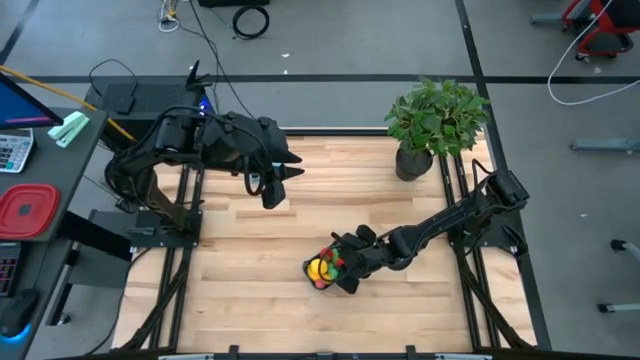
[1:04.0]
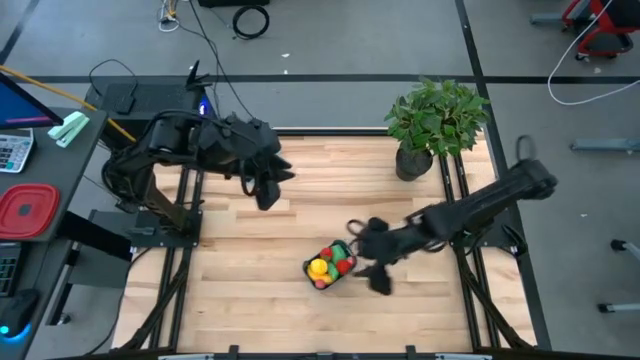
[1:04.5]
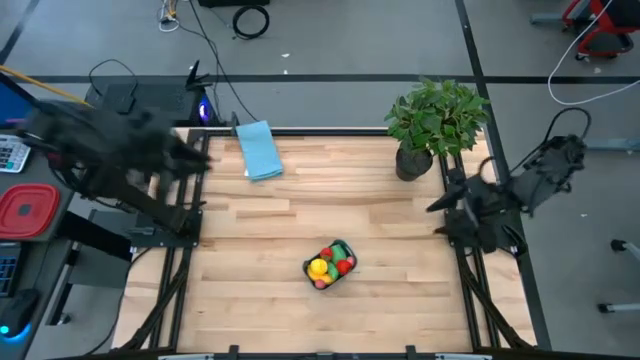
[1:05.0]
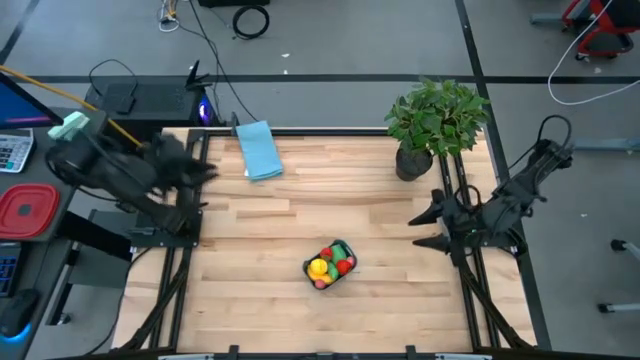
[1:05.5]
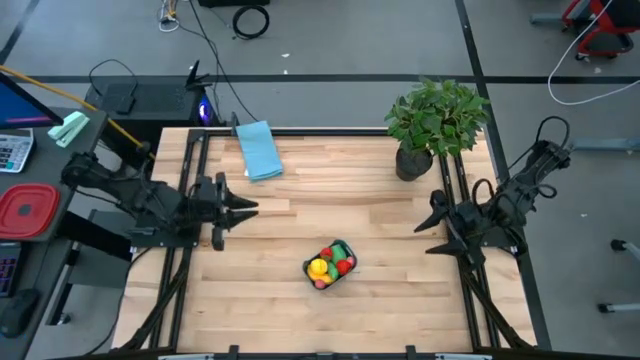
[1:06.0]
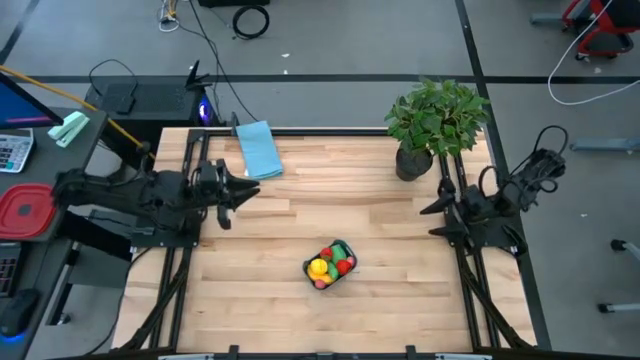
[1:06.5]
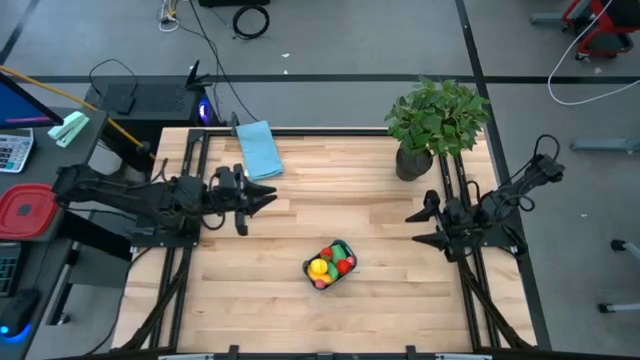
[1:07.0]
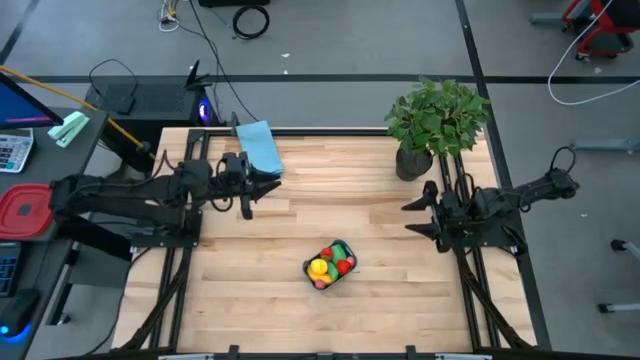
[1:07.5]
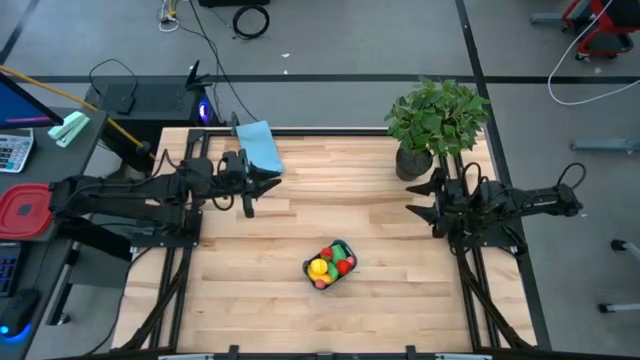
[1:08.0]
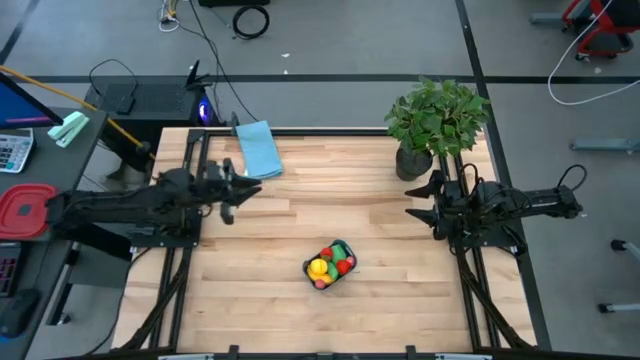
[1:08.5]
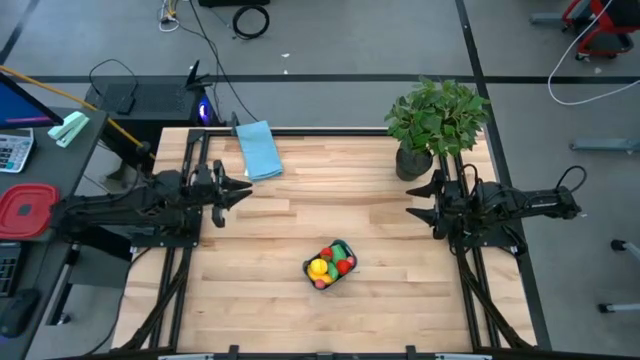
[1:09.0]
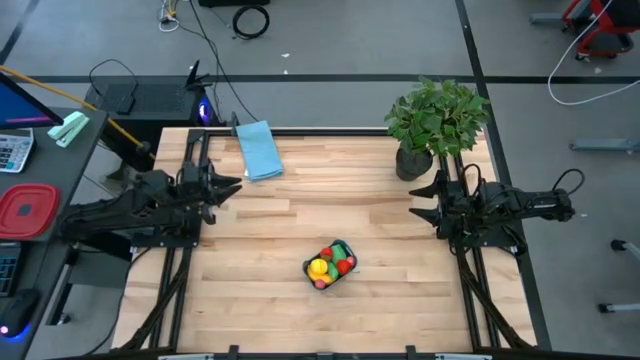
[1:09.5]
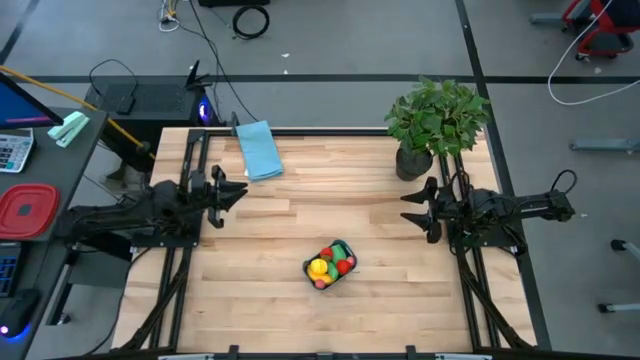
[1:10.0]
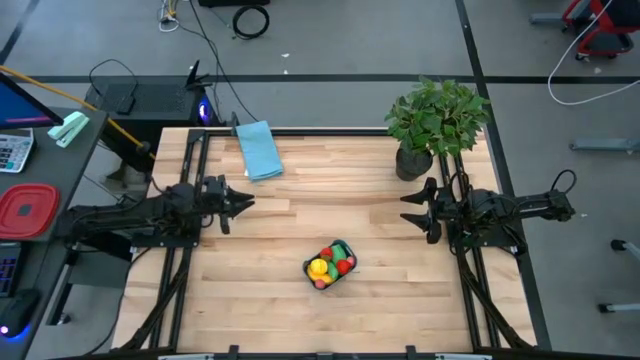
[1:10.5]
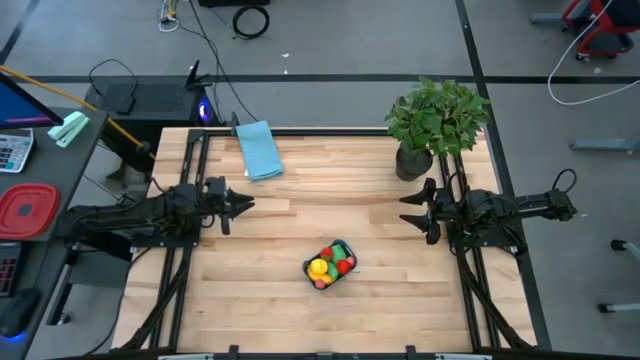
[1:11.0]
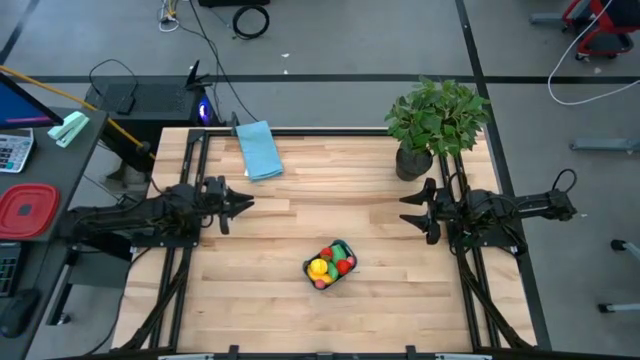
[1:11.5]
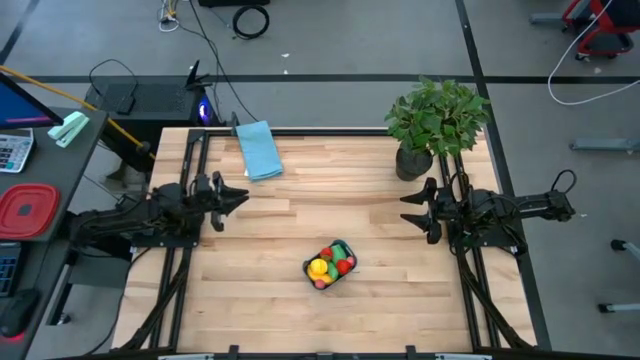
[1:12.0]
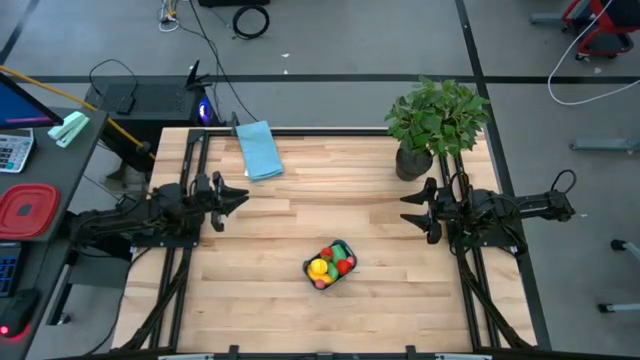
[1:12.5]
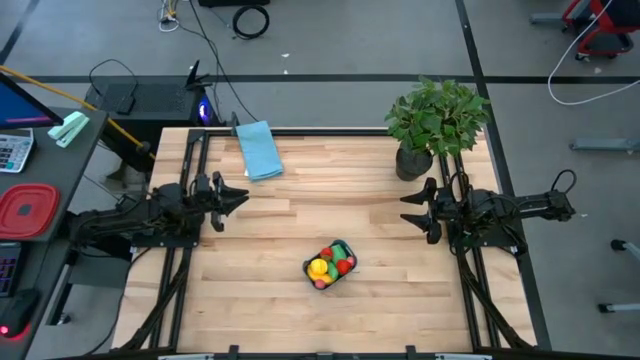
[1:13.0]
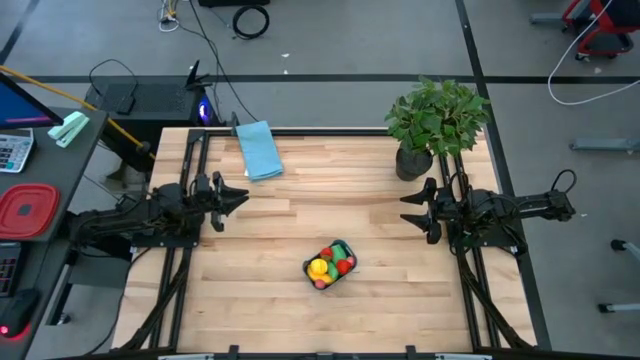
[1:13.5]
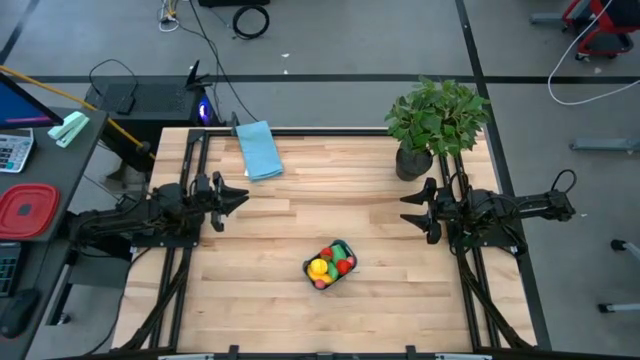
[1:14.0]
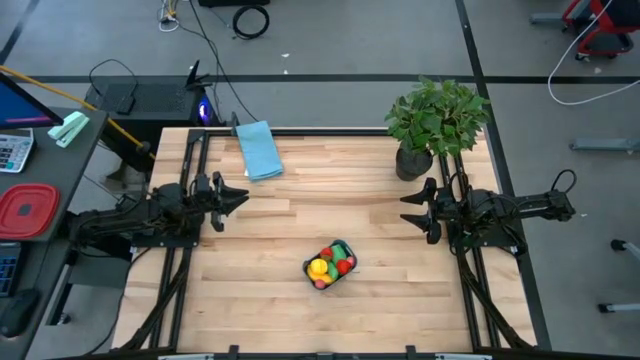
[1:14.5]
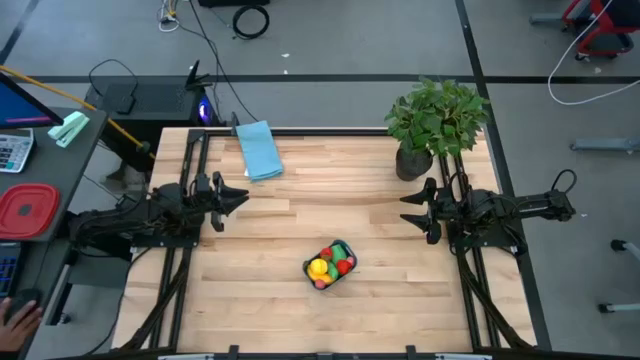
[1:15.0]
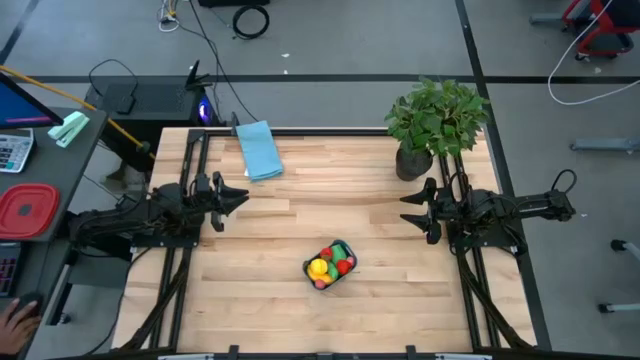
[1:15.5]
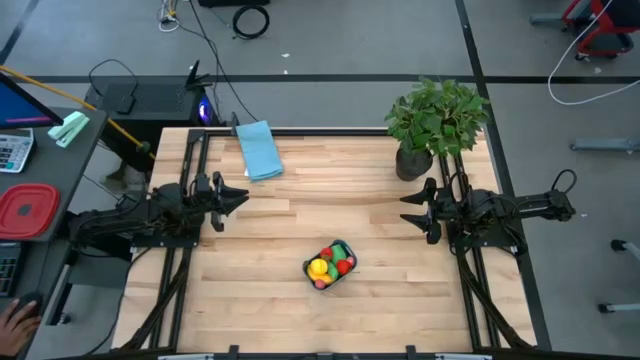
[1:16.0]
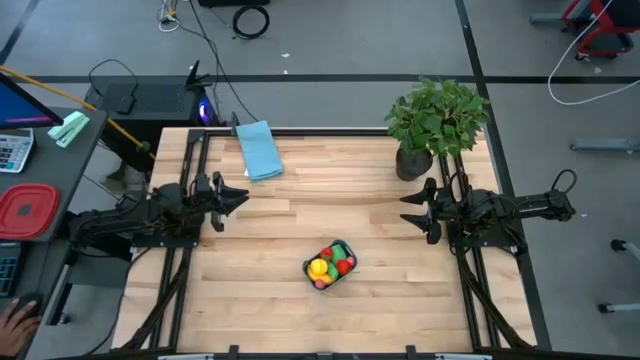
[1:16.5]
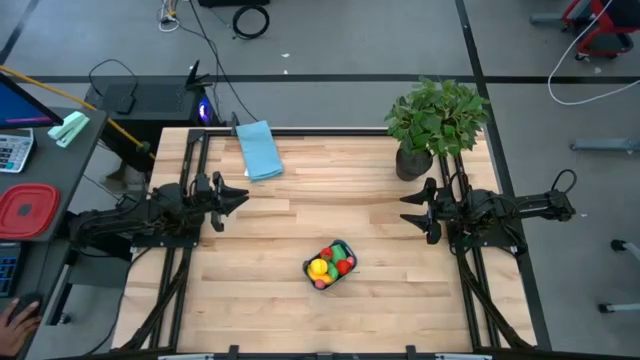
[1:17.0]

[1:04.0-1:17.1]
Task: Pick and placing Produce into tupperware
Return to Home Position

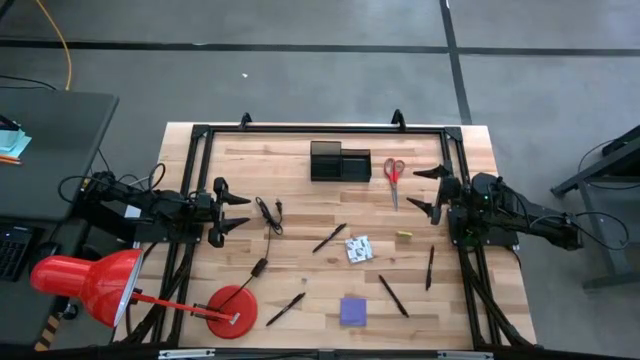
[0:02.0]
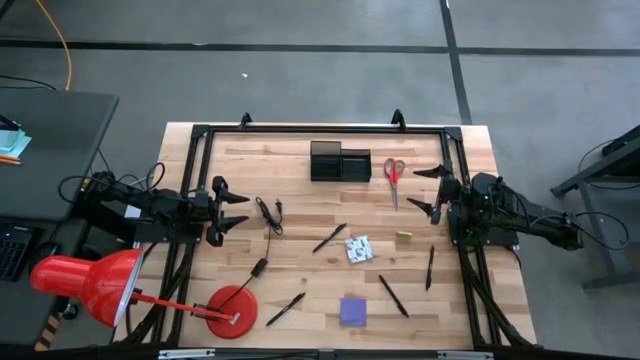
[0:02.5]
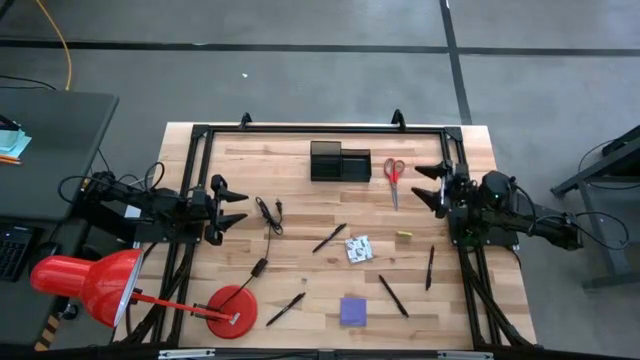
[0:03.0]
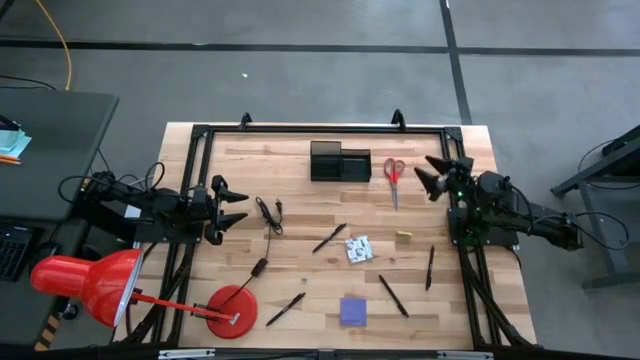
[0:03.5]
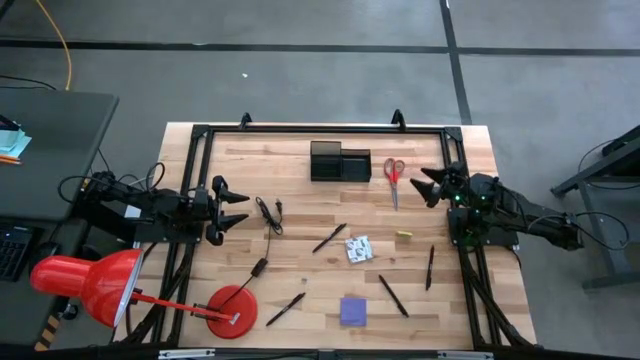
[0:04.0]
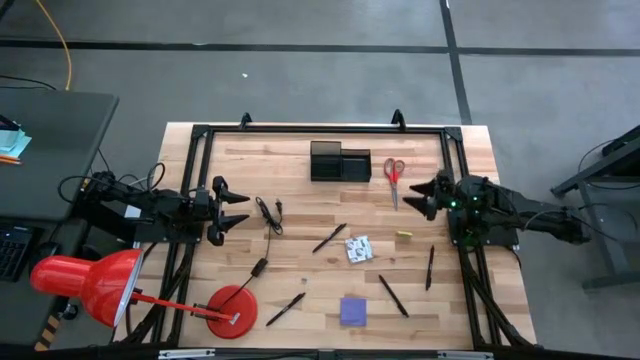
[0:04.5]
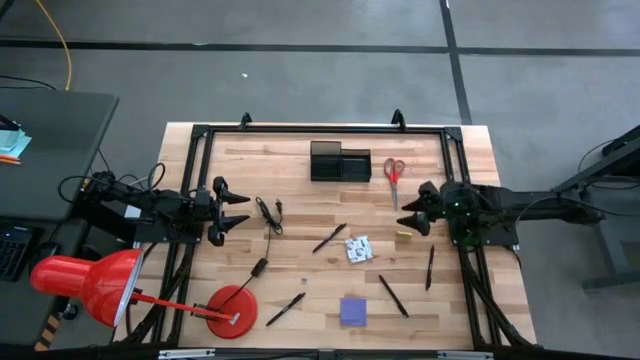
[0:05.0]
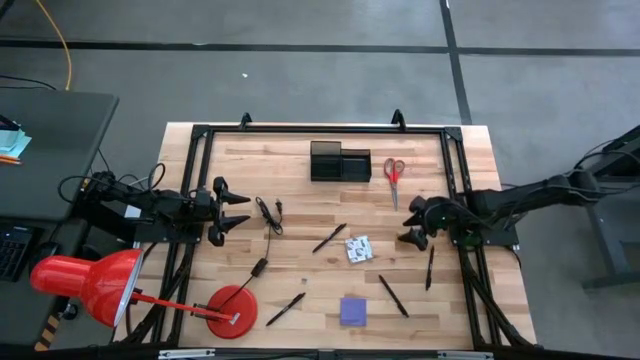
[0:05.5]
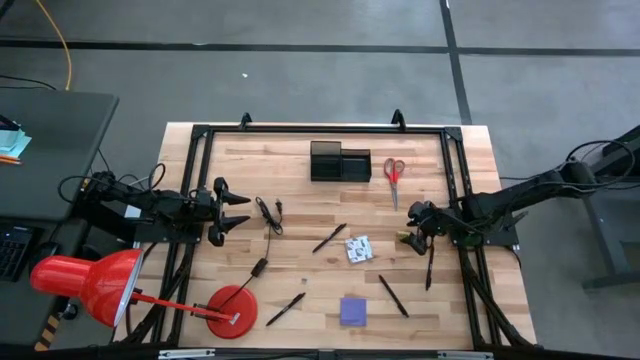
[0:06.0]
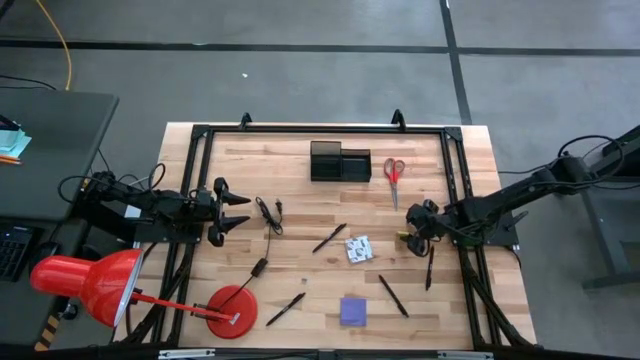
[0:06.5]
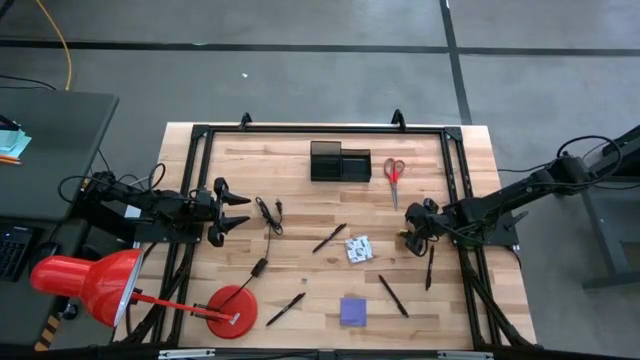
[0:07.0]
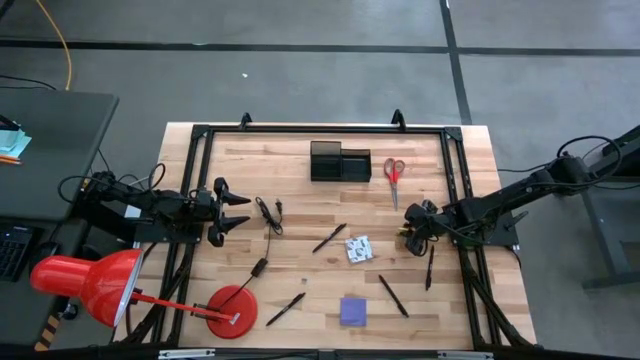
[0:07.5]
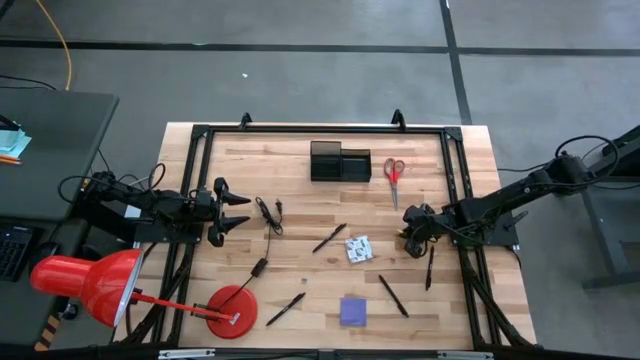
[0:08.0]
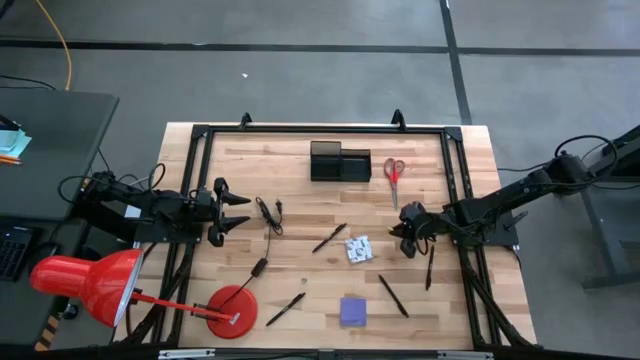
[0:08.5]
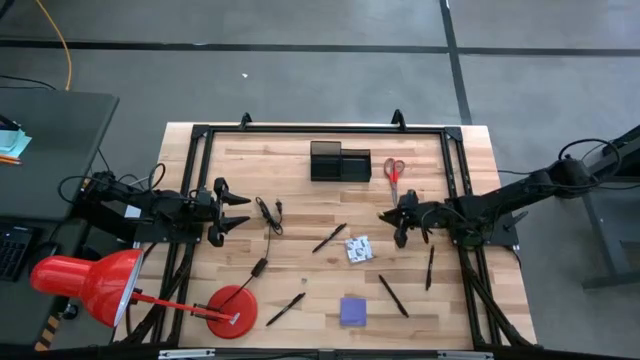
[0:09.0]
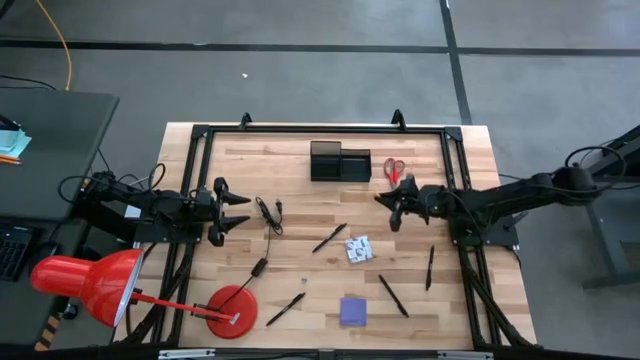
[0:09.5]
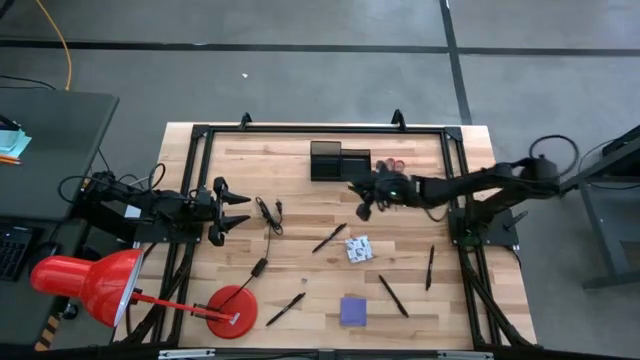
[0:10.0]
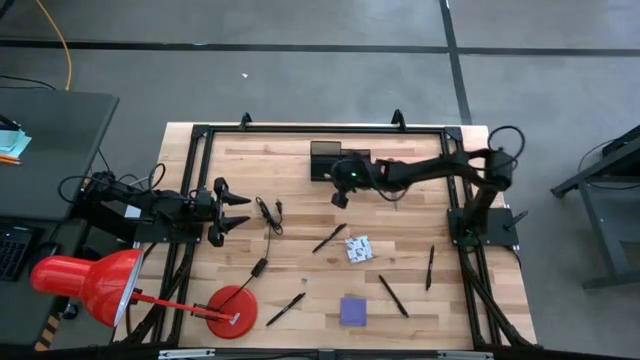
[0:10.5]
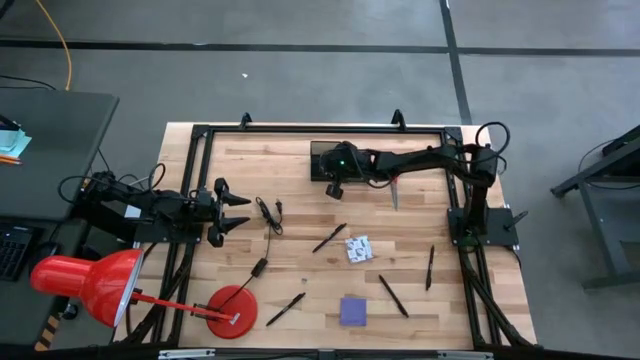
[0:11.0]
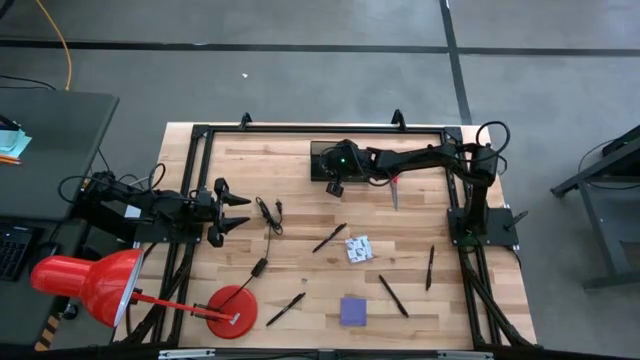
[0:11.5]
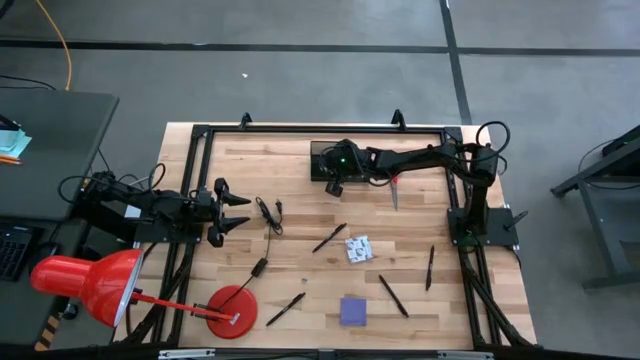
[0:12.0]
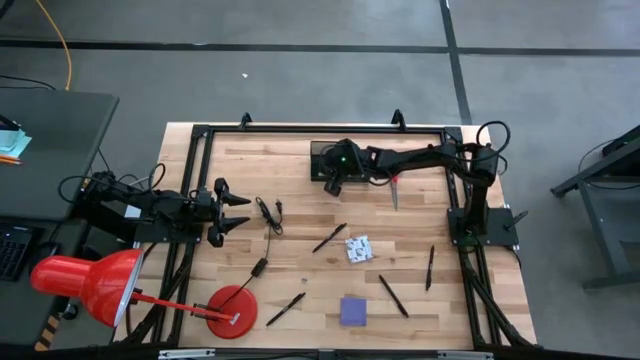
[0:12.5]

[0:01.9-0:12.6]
Task: Pick and place office supplies into organizer
Put the yellow eraser into the mesh desk organizer
